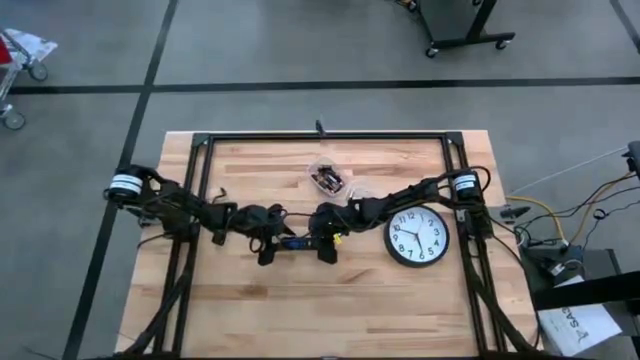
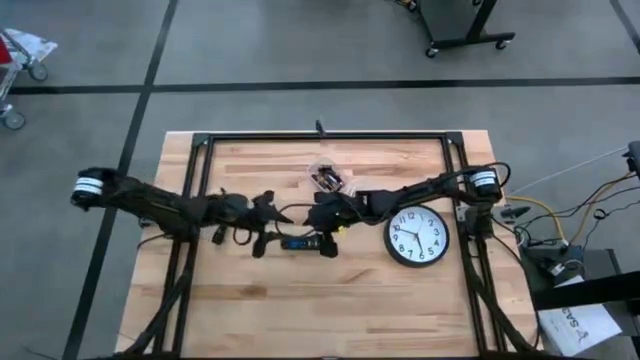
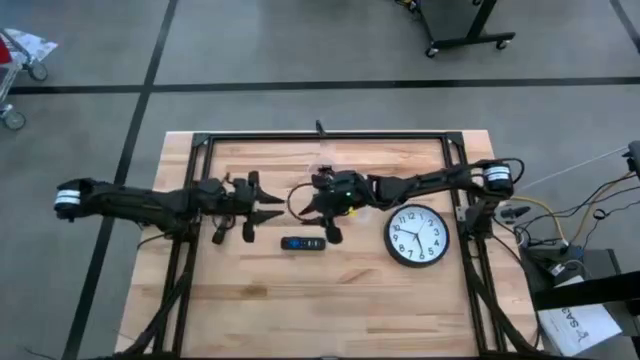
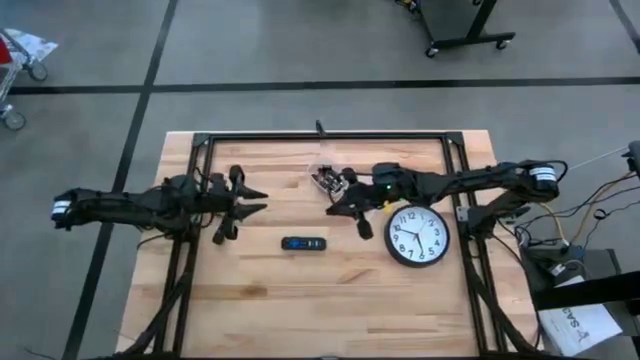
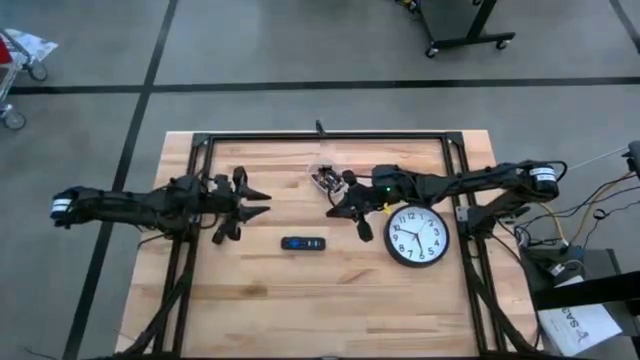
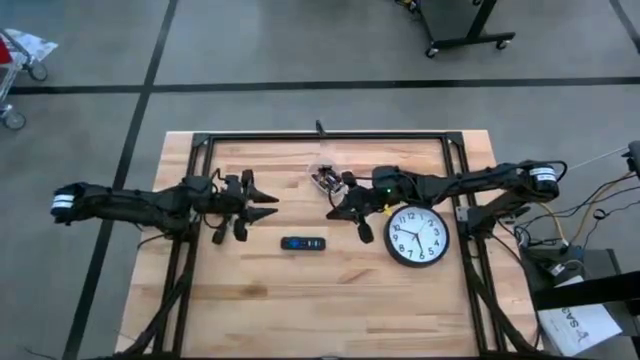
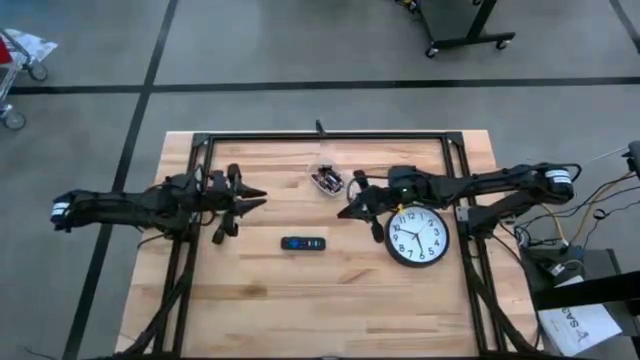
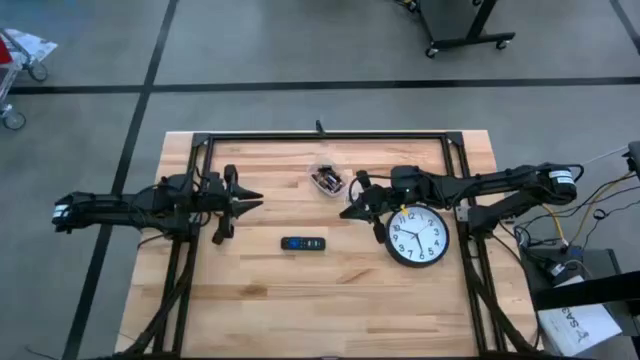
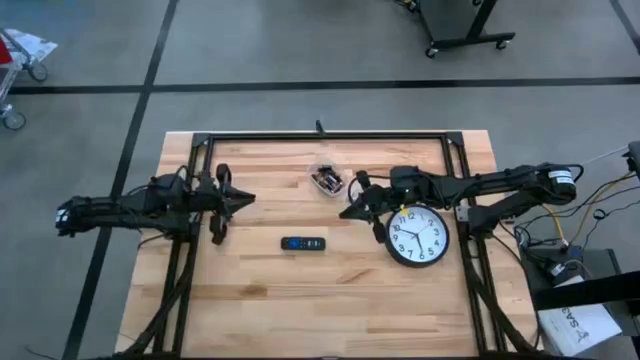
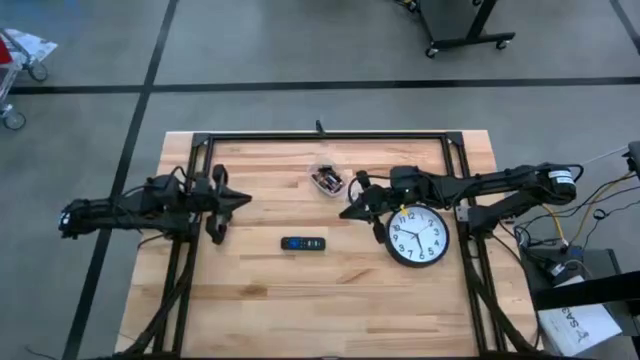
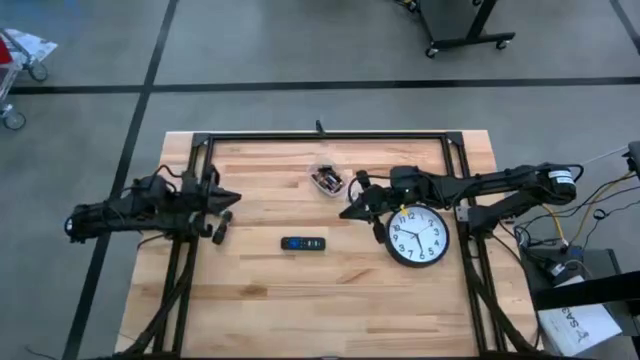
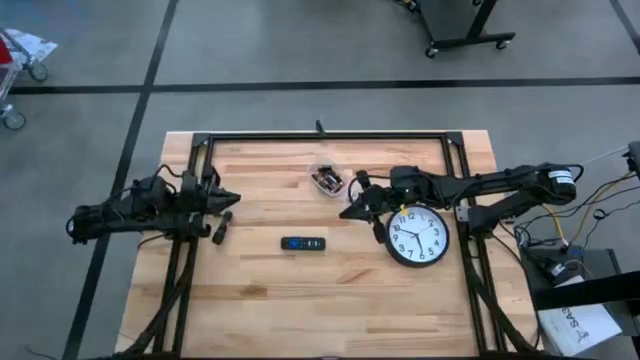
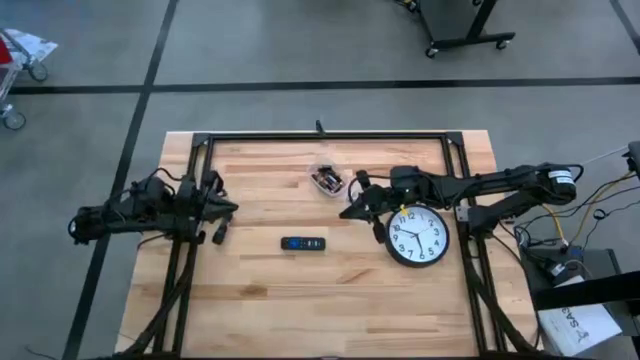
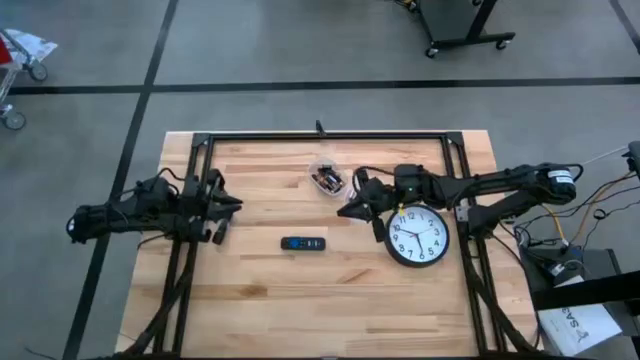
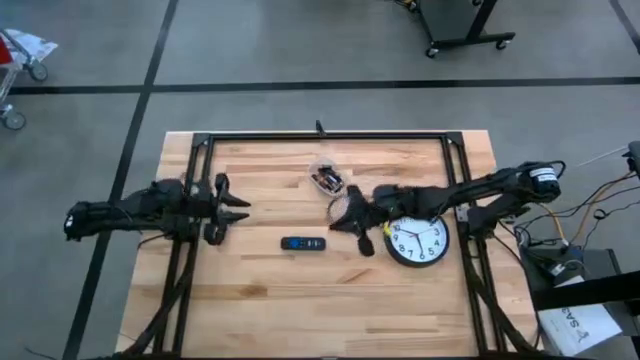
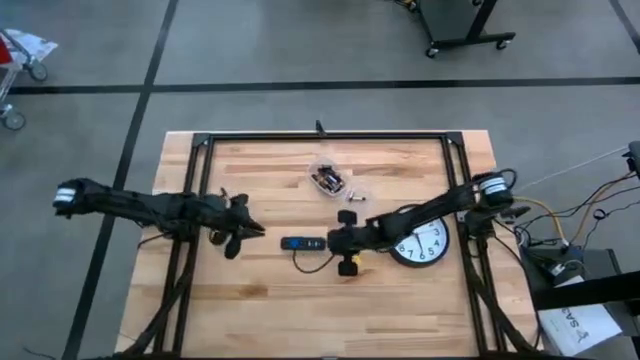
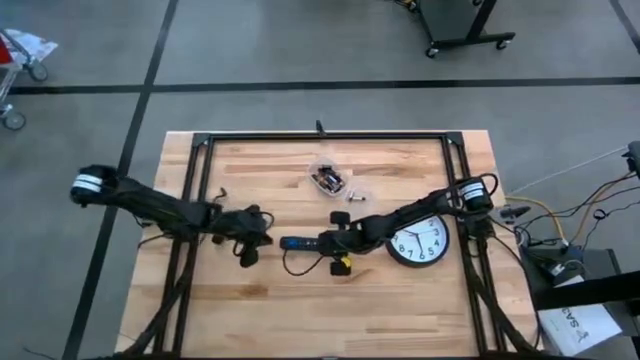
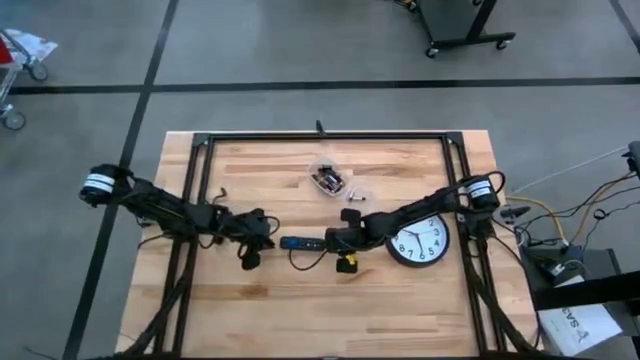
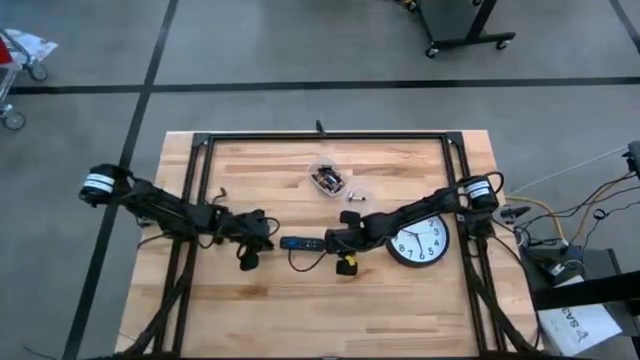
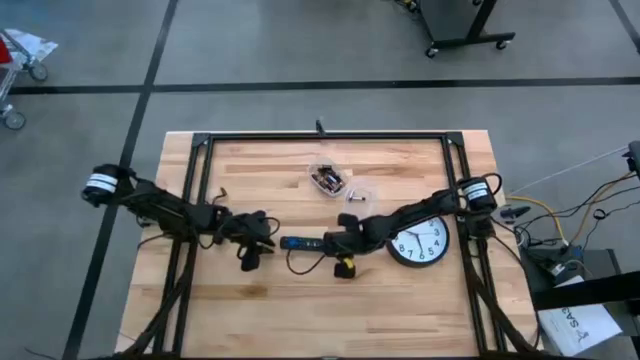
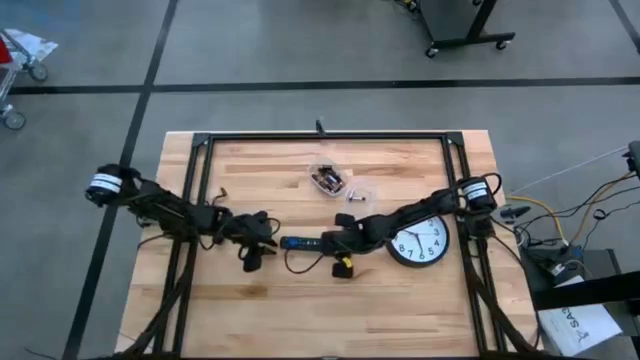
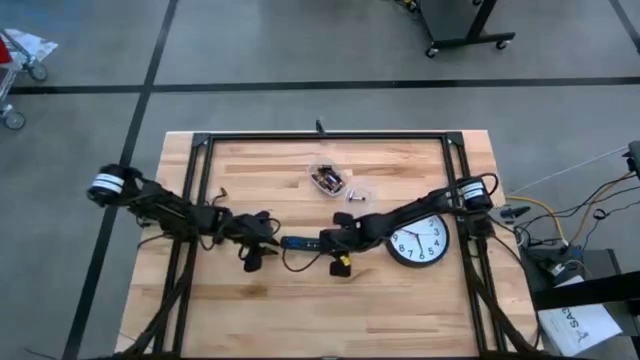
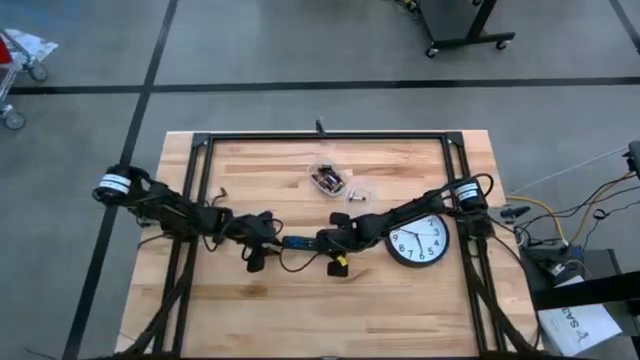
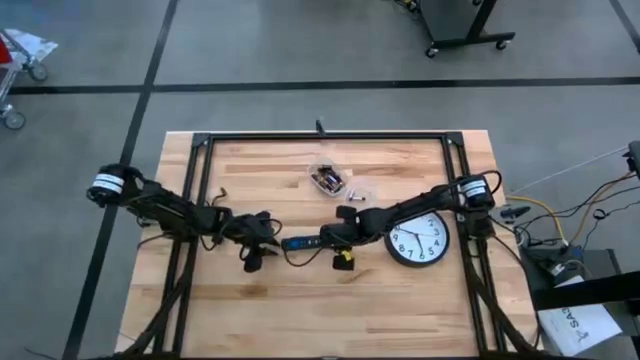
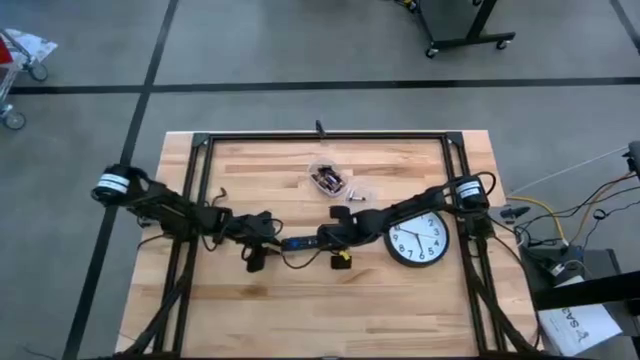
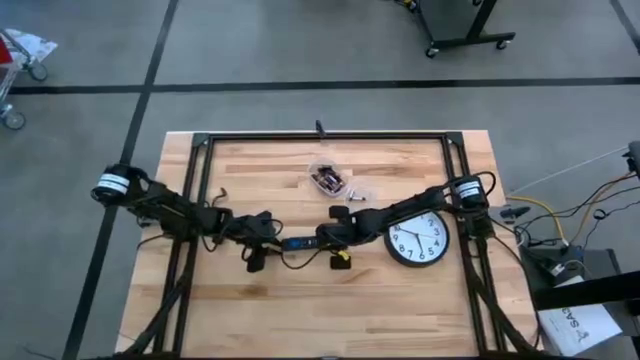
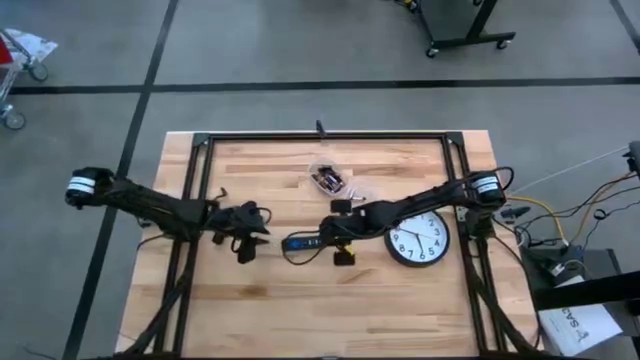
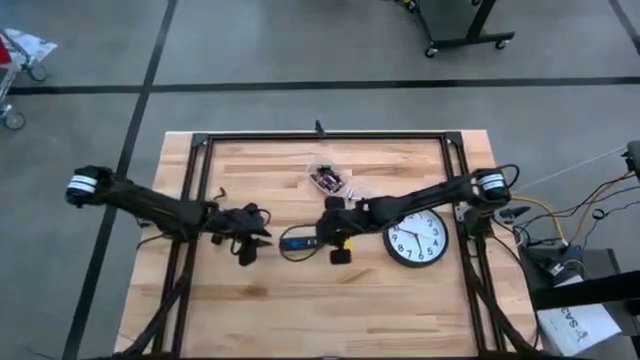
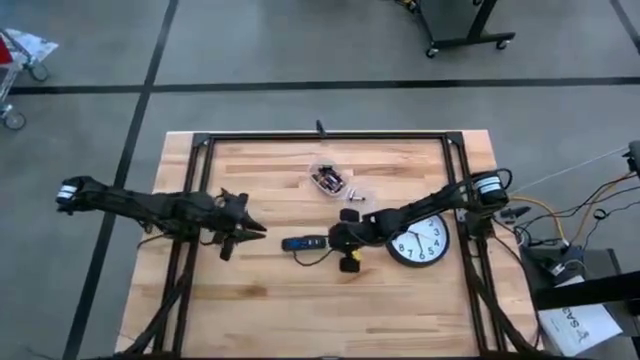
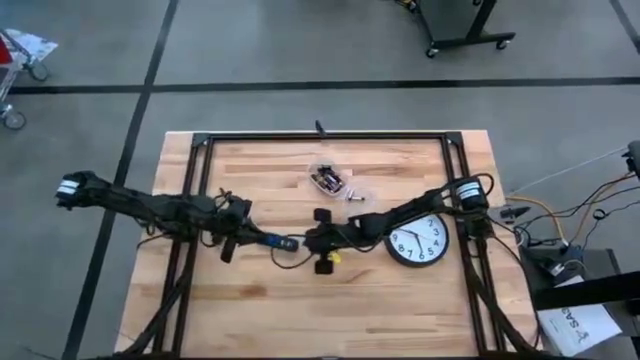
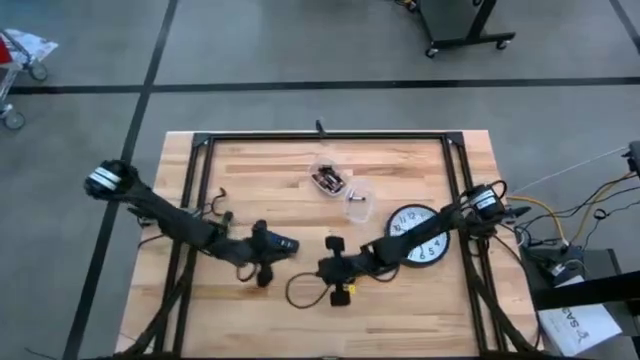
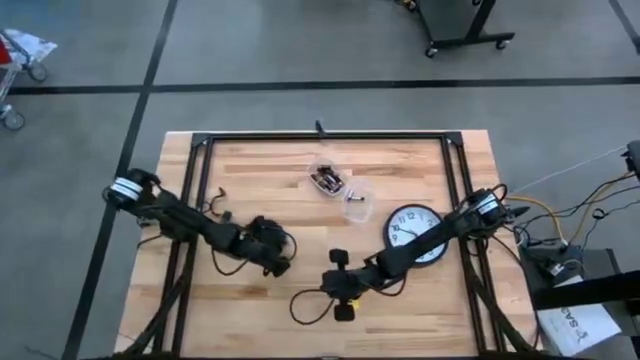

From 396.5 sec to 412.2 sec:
Task: Insert battery
Adjust the black remote

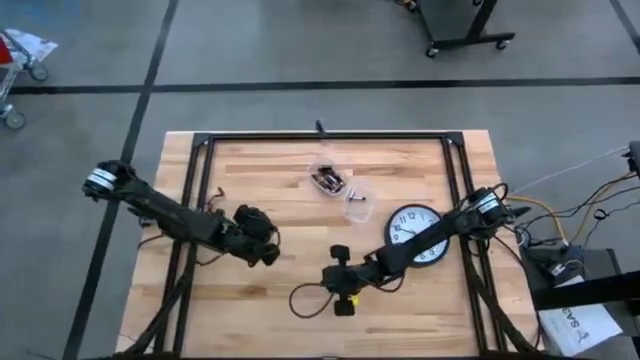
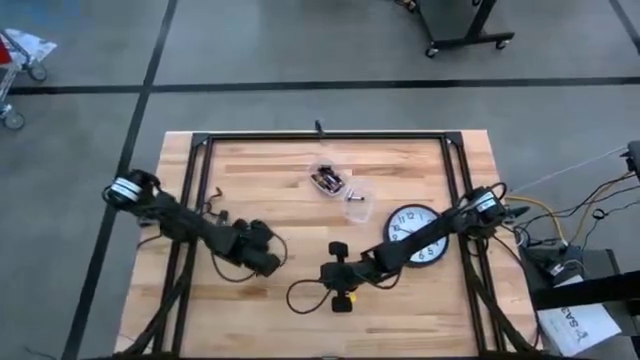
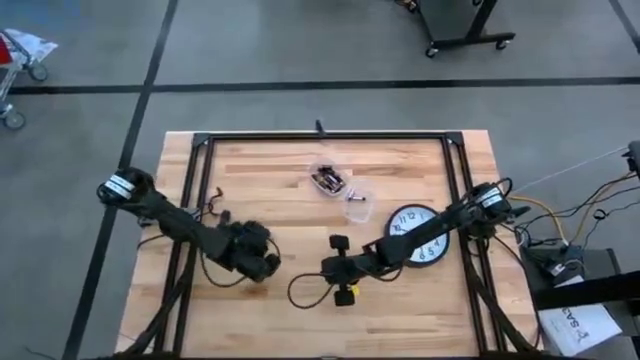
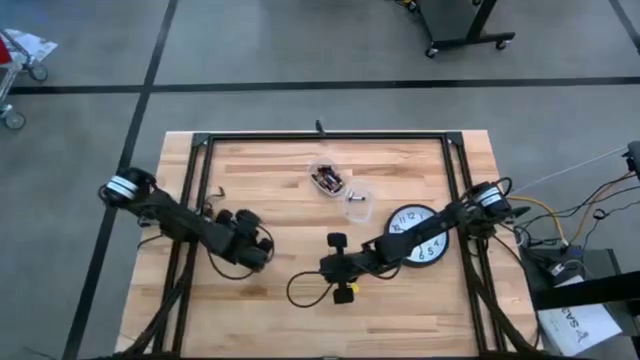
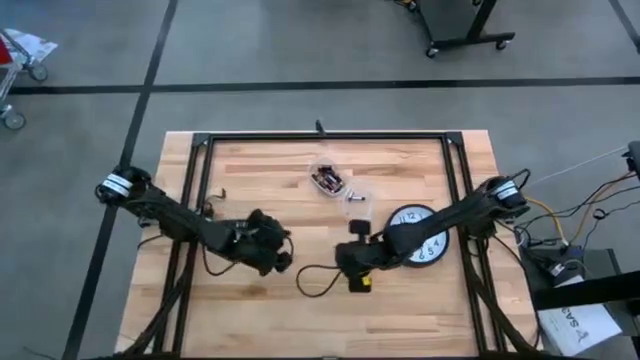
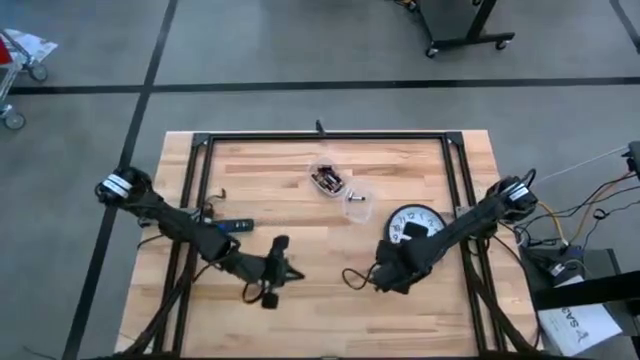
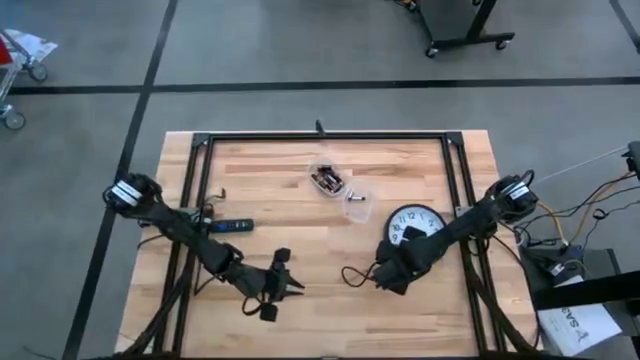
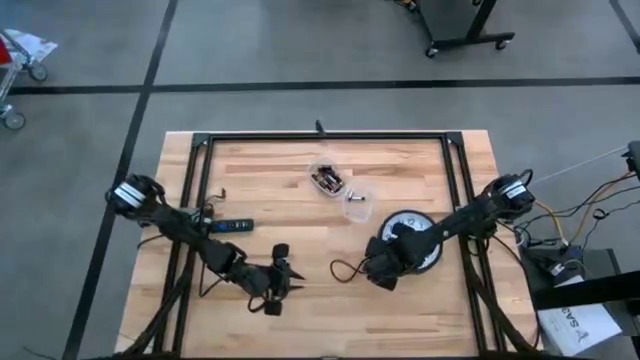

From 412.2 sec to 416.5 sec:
Adjust the wall clock

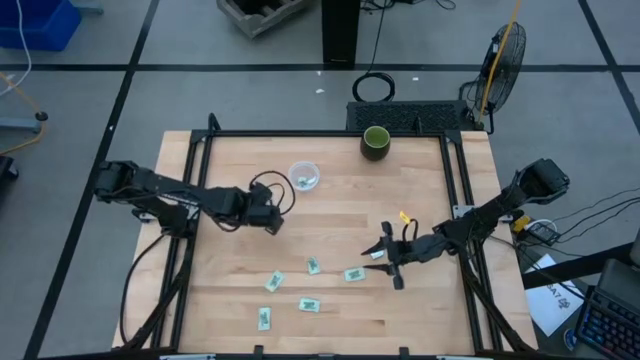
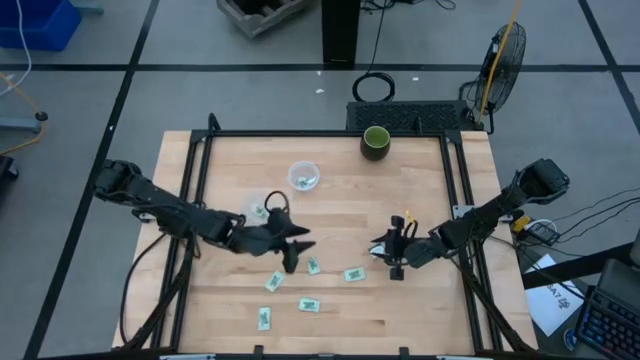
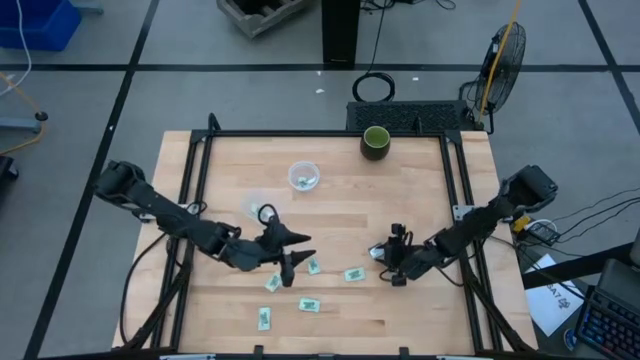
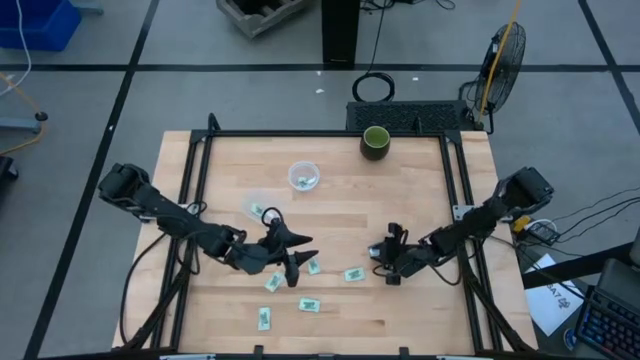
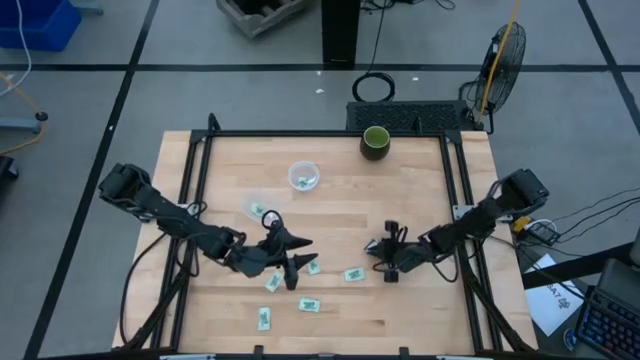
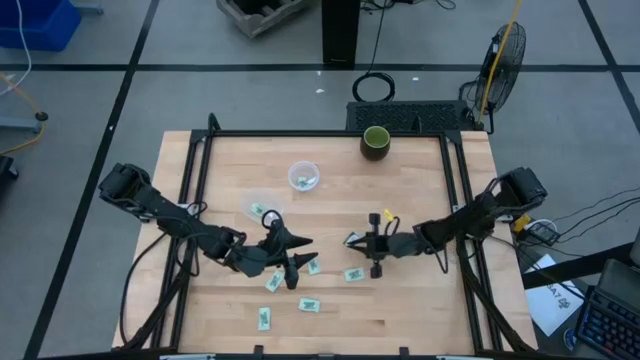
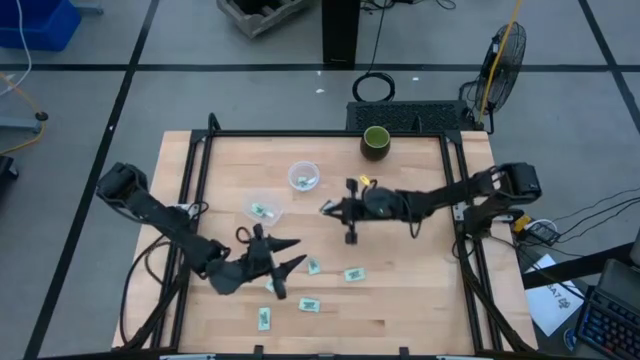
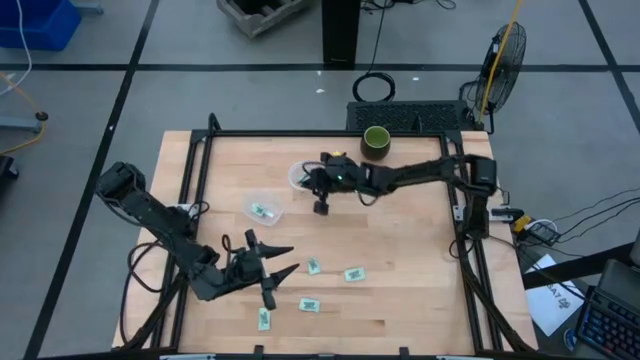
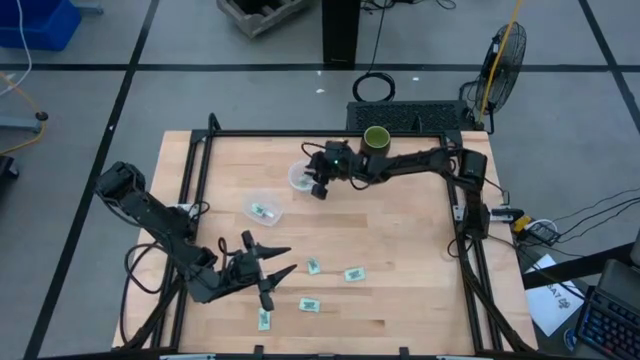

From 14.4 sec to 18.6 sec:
Task: Pick and place Stevia / Truvia into bins
Put the stevia packet into the top container
